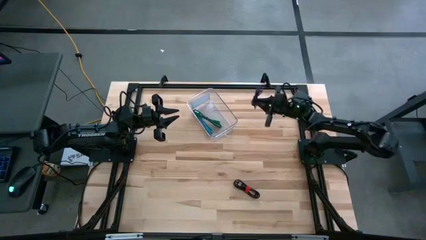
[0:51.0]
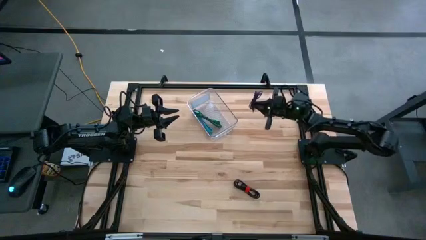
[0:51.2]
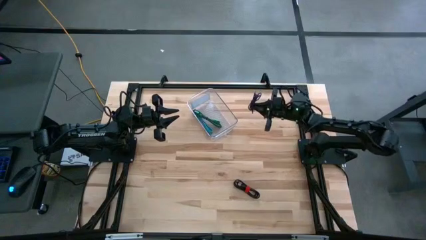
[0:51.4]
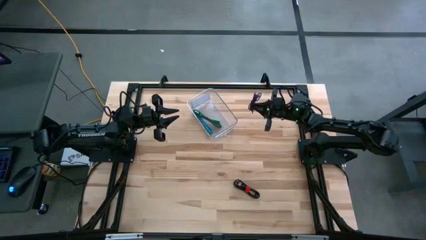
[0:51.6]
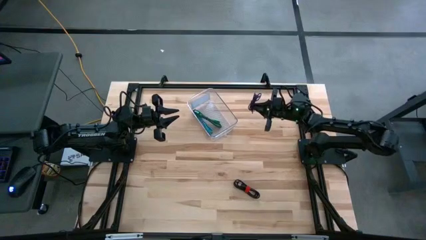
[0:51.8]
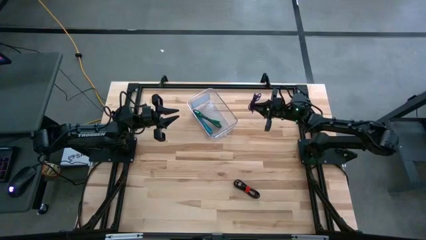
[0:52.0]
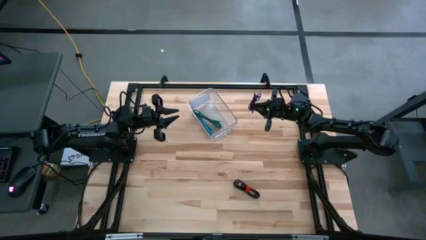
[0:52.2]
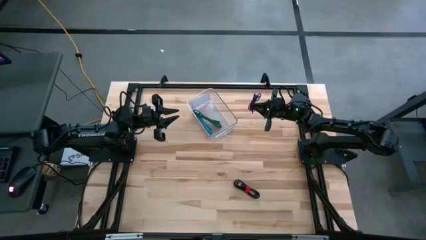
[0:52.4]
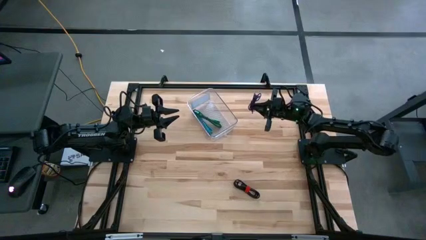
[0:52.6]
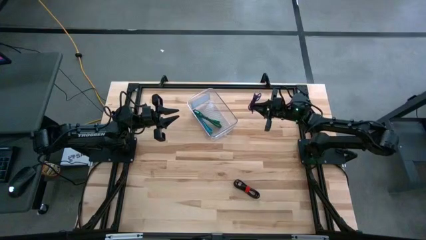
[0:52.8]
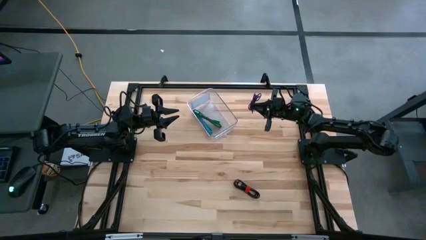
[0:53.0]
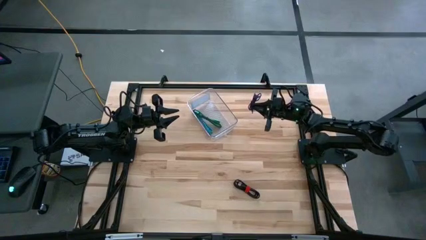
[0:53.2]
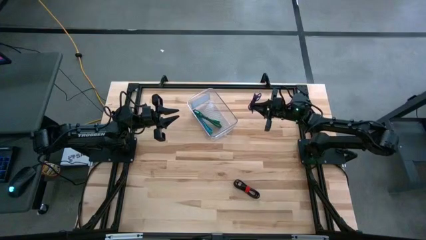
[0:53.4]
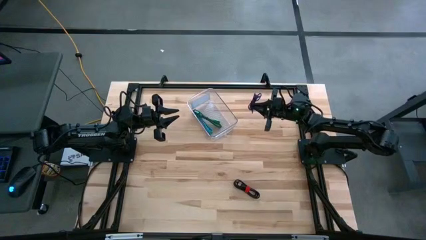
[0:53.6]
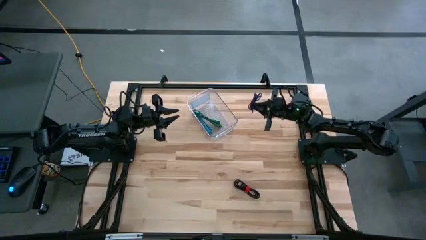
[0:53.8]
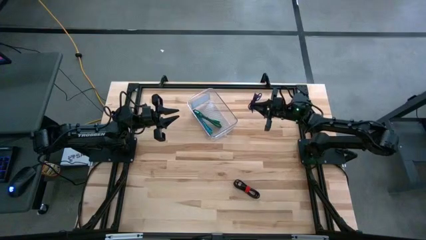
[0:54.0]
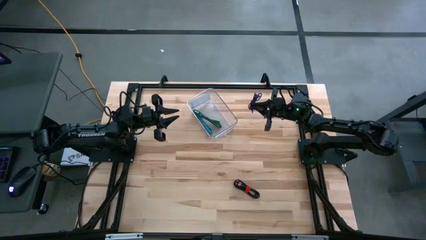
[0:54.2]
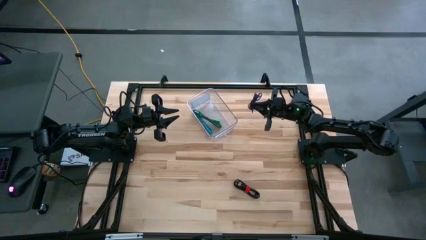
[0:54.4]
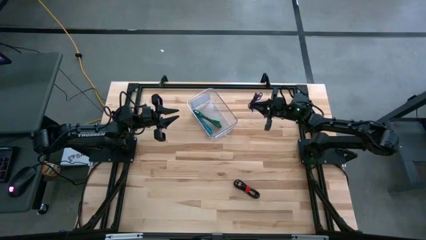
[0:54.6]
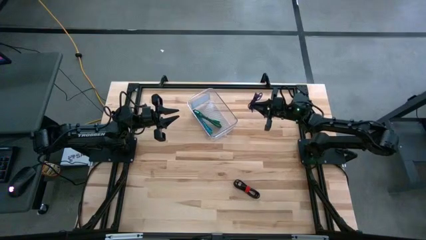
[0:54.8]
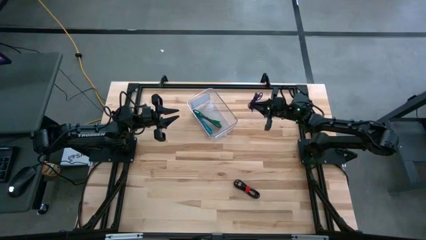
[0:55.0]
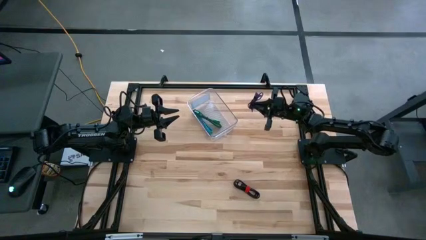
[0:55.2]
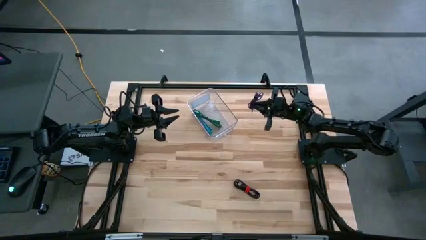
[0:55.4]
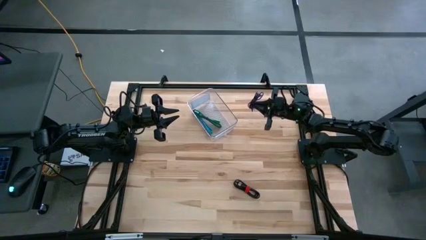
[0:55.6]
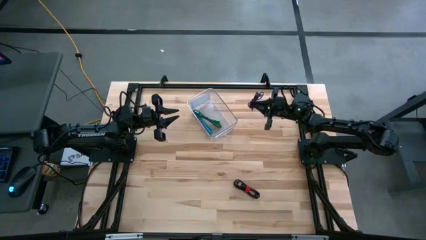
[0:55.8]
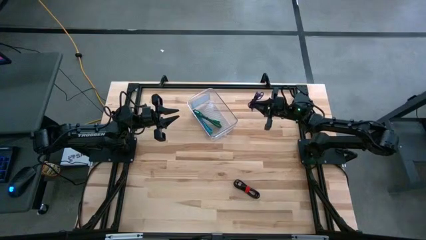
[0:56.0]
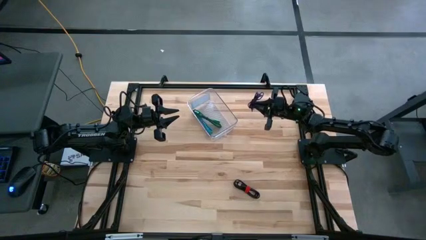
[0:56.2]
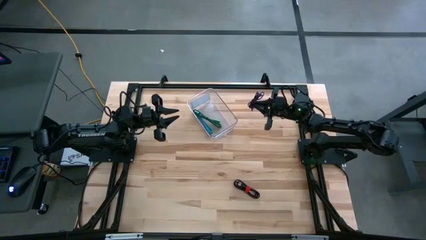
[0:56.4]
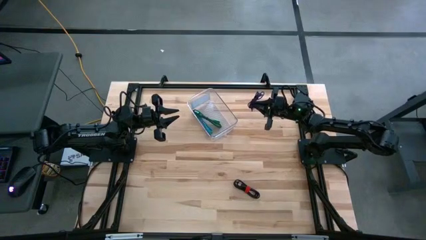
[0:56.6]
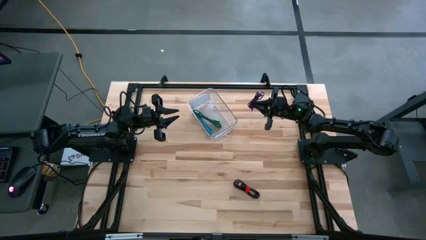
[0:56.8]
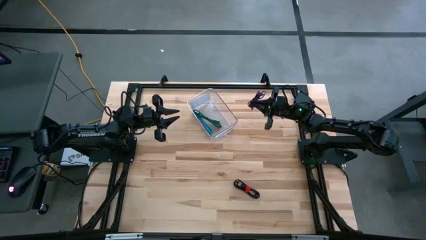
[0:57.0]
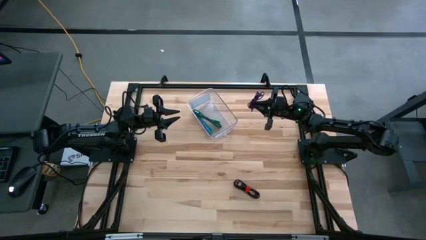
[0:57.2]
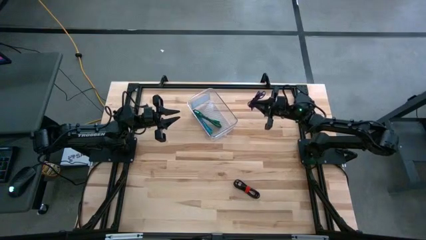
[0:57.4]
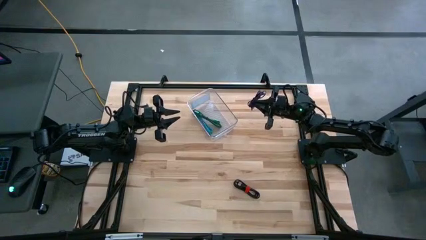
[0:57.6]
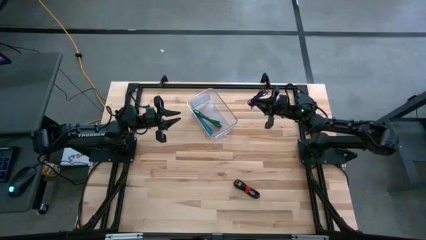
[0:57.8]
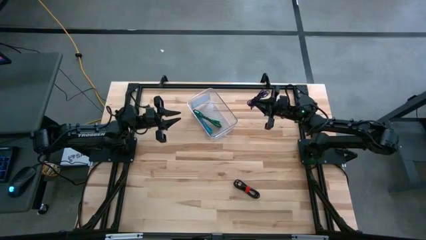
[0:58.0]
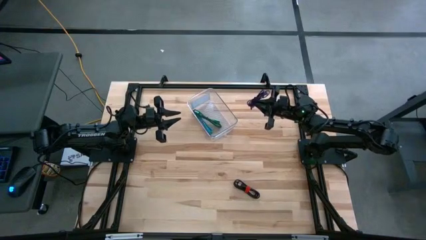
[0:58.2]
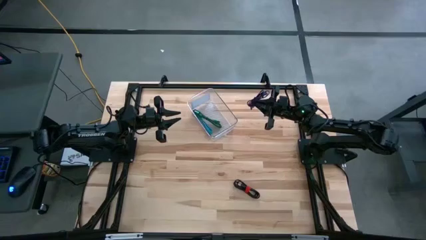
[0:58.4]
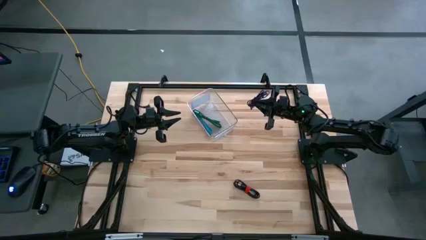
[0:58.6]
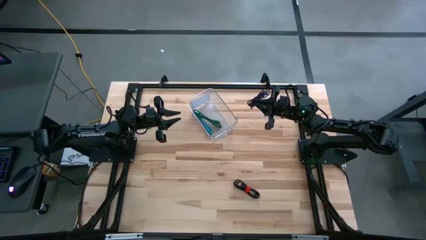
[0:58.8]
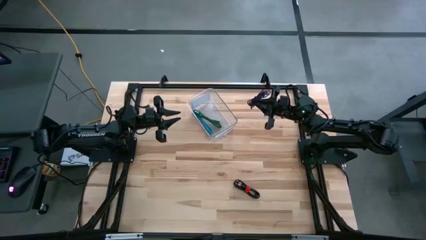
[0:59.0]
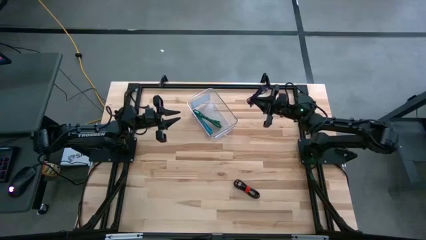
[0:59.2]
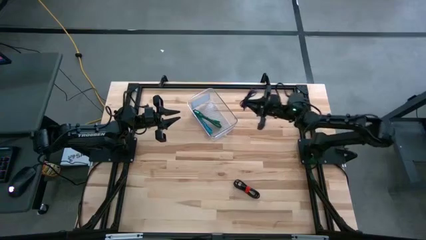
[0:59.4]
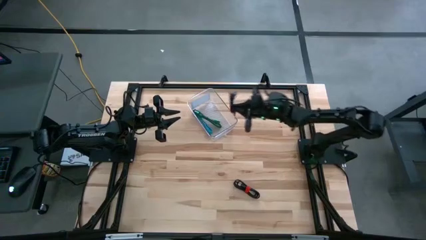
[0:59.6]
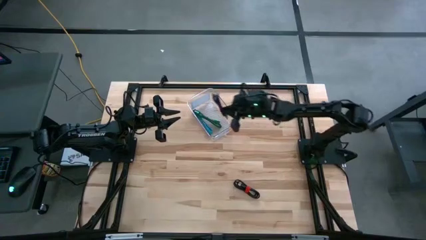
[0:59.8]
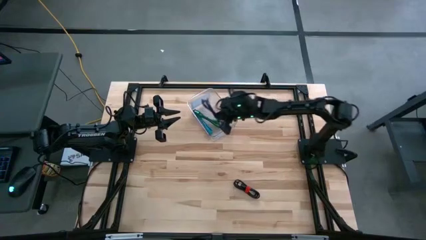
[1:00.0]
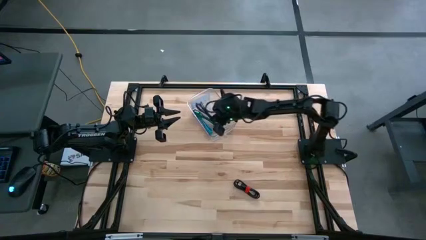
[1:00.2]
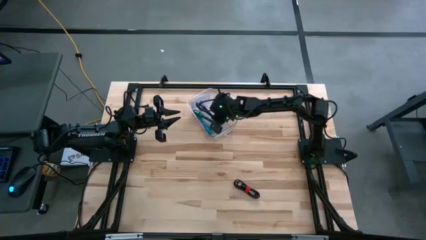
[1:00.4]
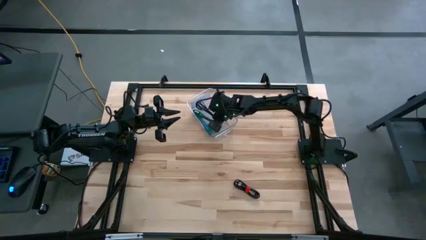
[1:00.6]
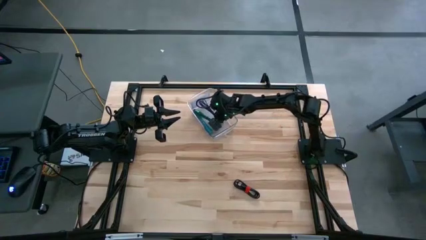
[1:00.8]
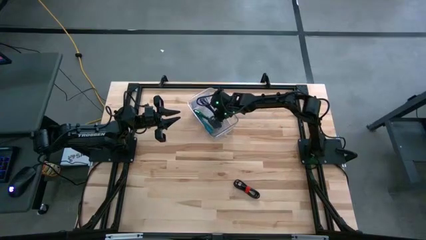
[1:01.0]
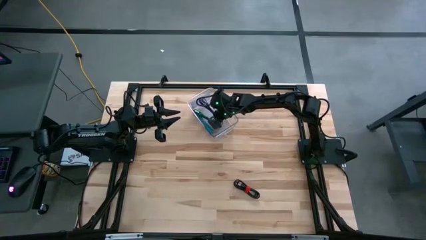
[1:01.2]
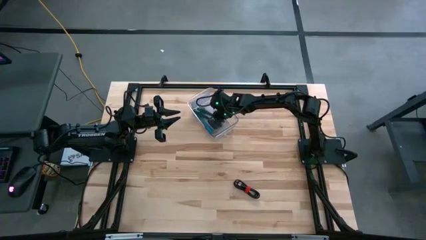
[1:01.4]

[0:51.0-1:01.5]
Task: Pick and place USB-C Cables
Put the purple charger cable into the transparent bin
